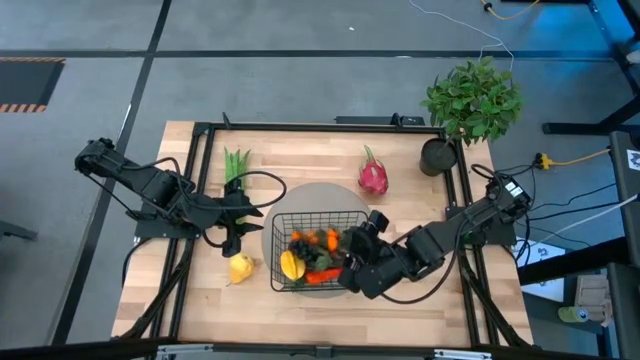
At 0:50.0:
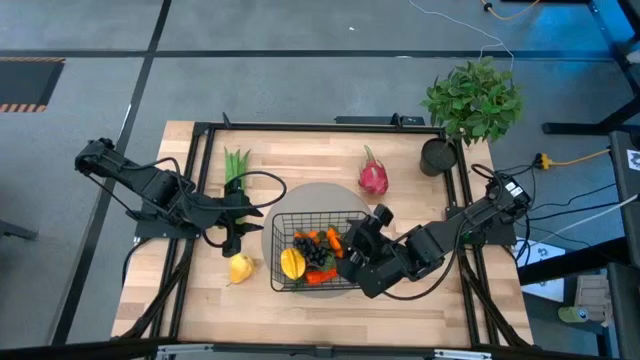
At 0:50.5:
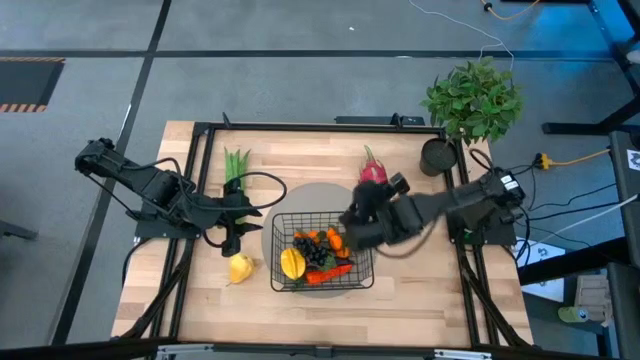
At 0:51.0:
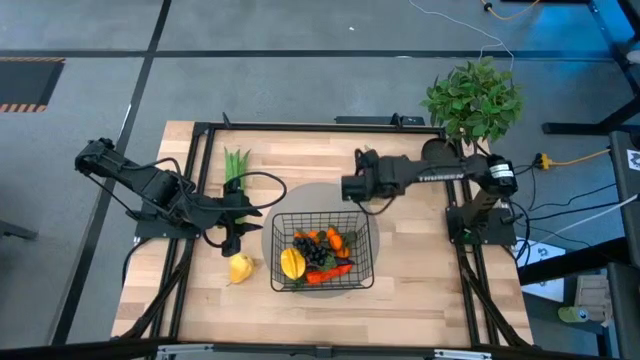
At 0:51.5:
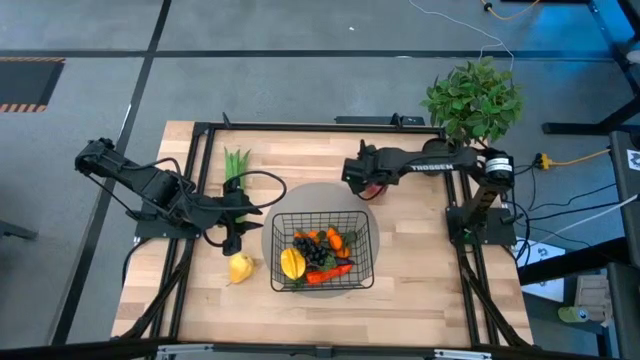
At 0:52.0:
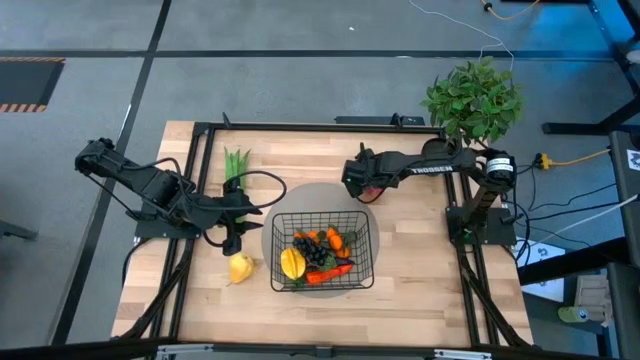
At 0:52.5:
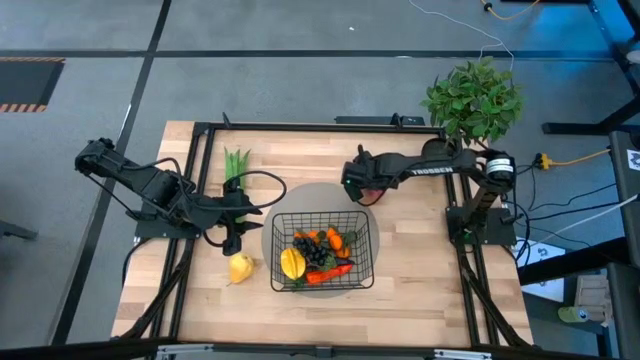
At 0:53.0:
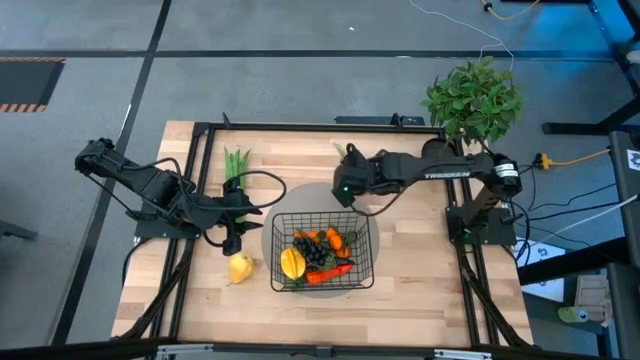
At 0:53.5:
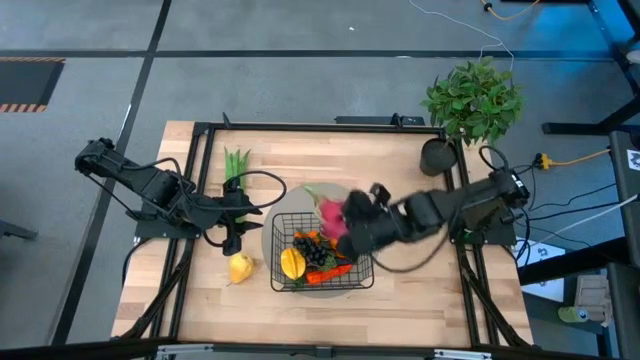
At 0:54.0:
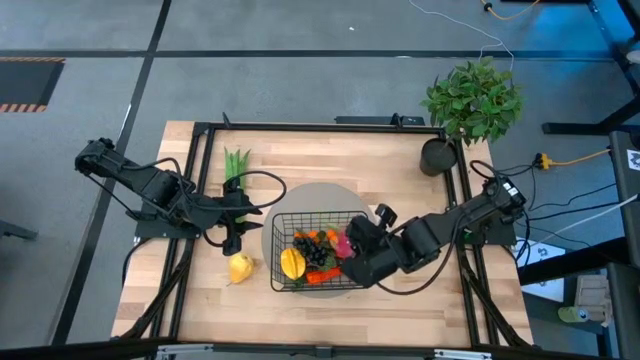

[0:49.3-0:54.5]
Task: Build produce basket
Put the dragonfruit into the wire basket

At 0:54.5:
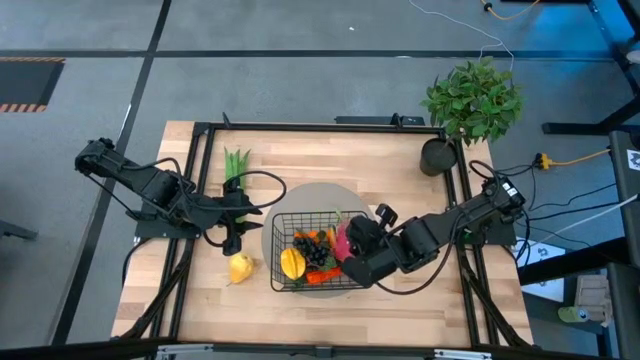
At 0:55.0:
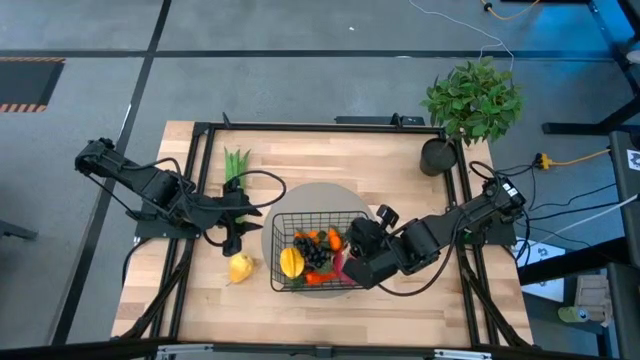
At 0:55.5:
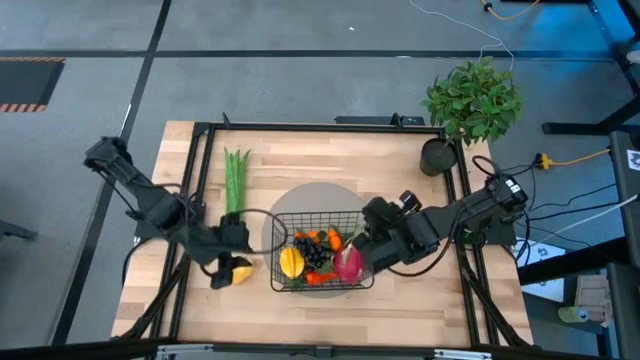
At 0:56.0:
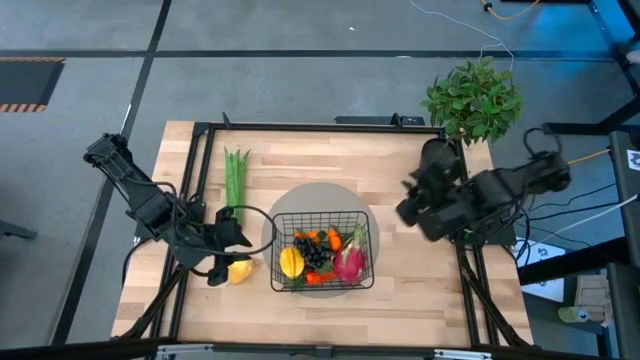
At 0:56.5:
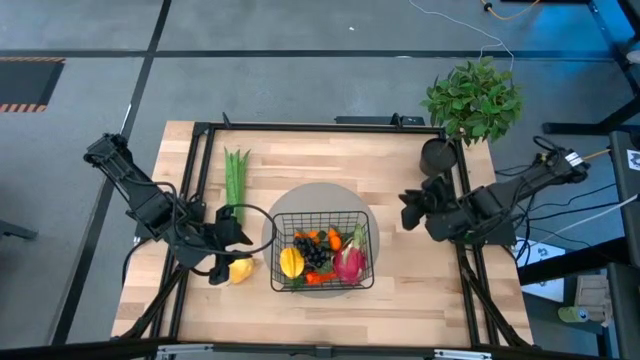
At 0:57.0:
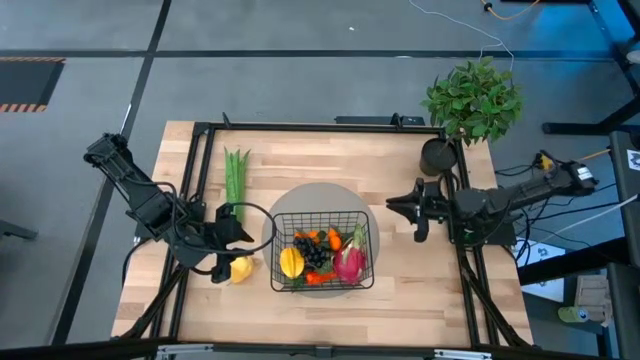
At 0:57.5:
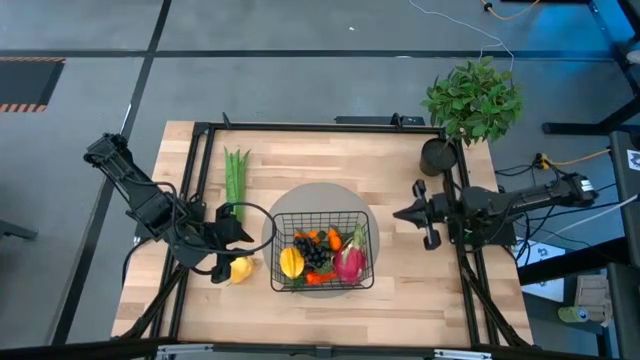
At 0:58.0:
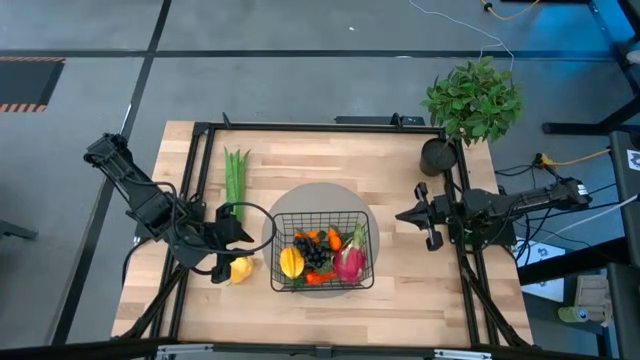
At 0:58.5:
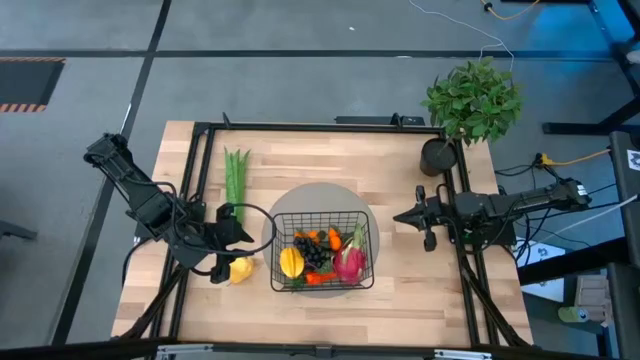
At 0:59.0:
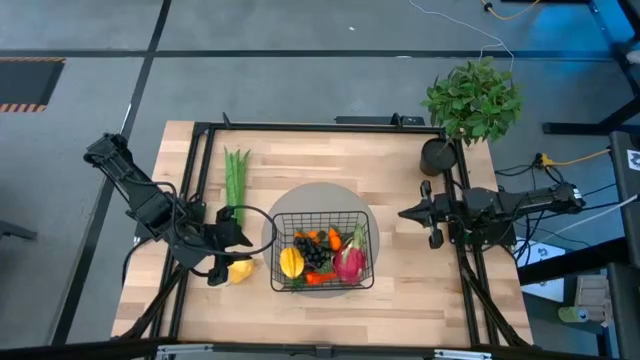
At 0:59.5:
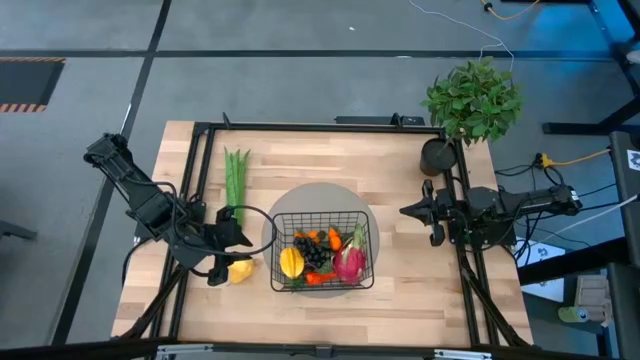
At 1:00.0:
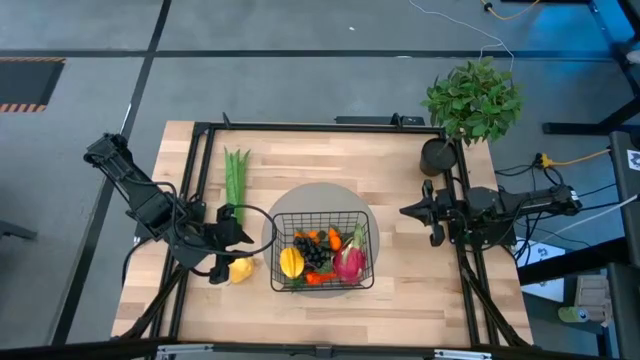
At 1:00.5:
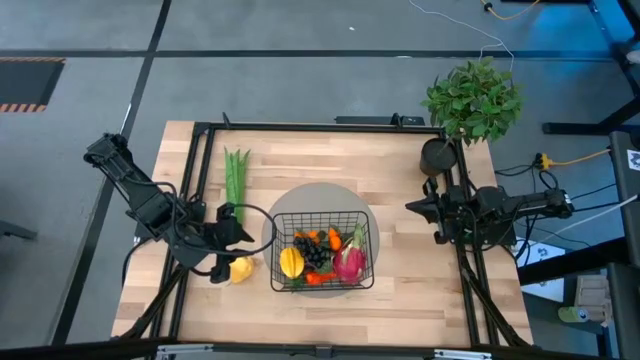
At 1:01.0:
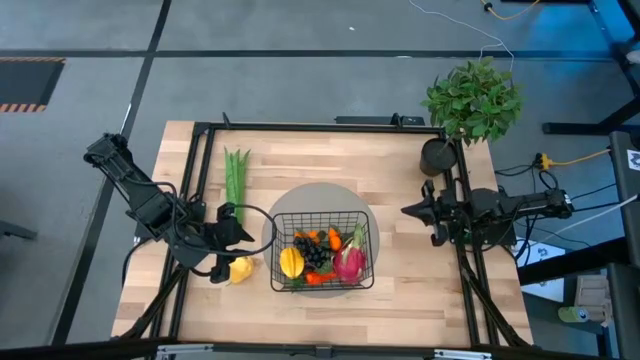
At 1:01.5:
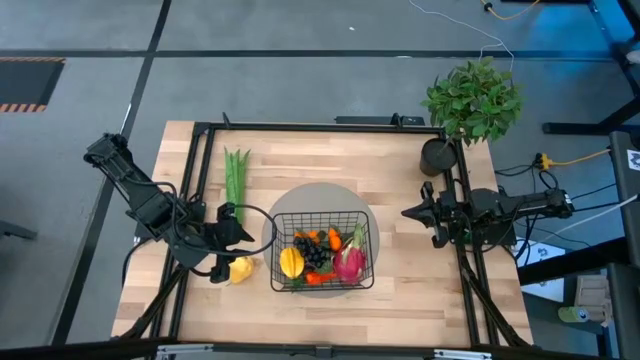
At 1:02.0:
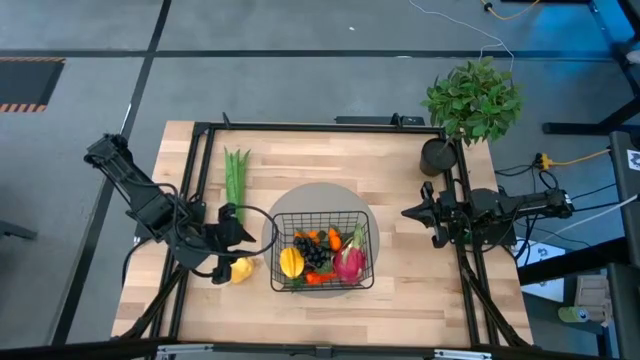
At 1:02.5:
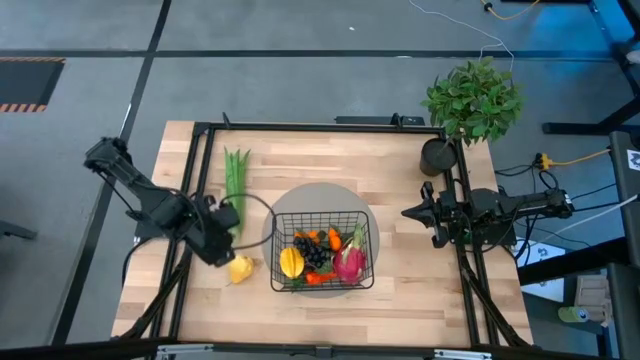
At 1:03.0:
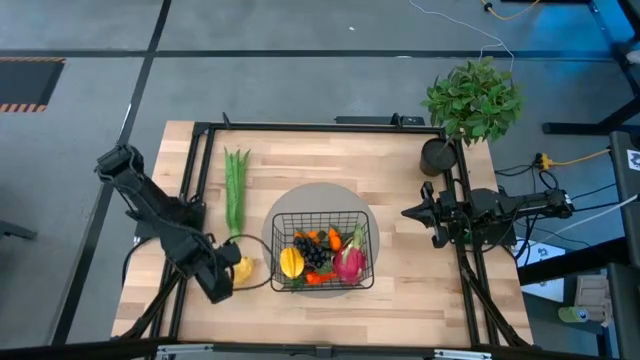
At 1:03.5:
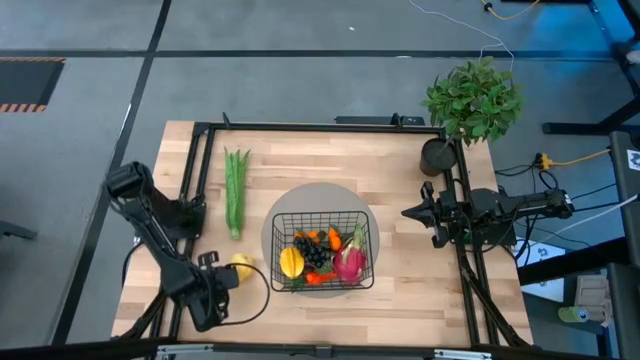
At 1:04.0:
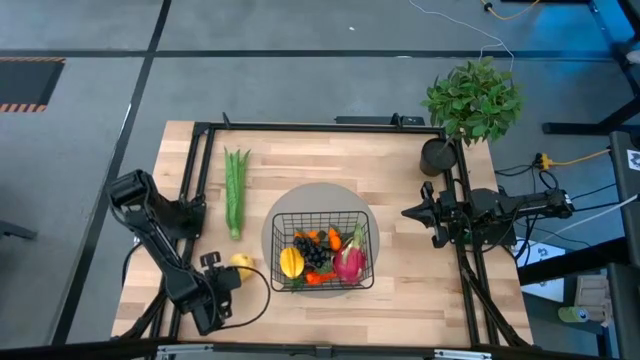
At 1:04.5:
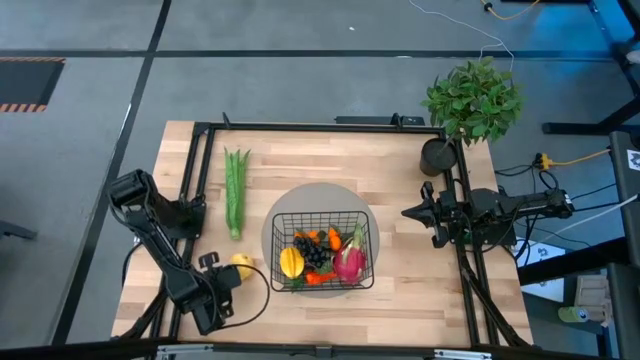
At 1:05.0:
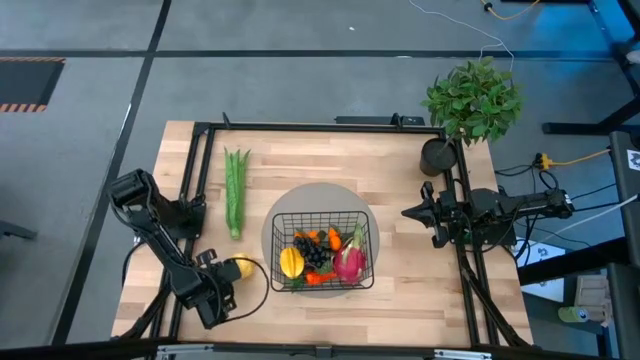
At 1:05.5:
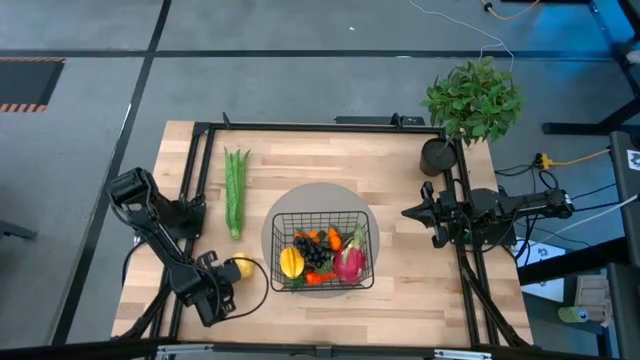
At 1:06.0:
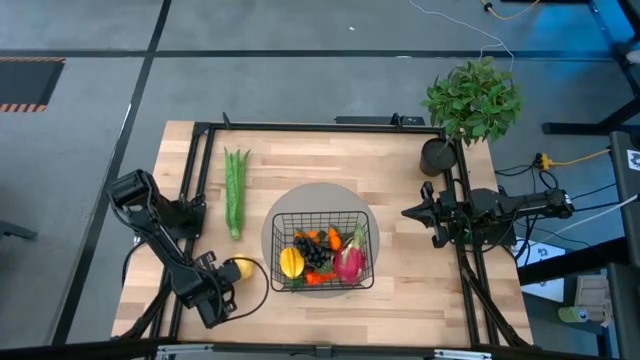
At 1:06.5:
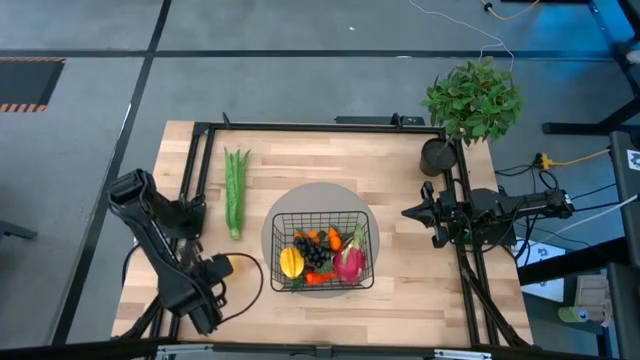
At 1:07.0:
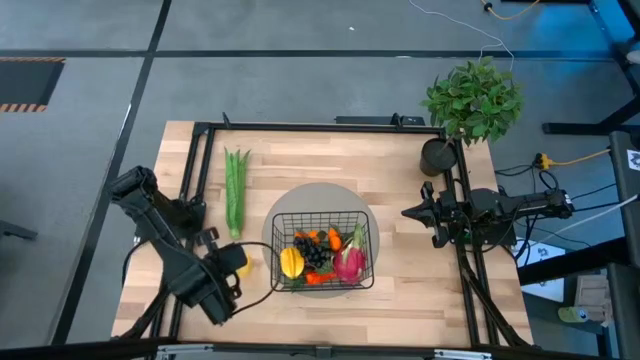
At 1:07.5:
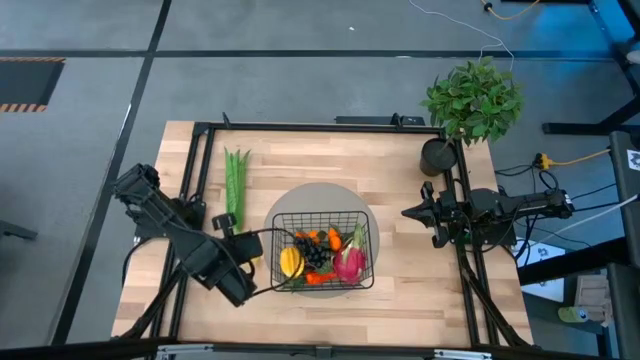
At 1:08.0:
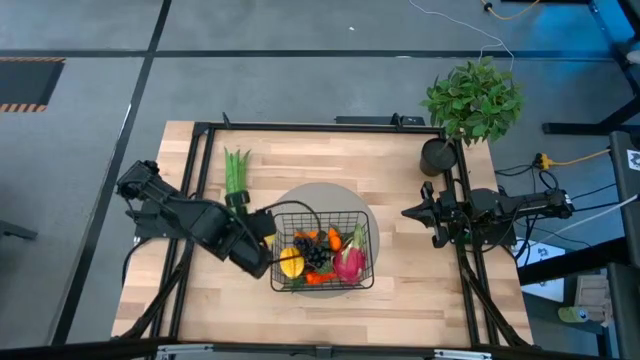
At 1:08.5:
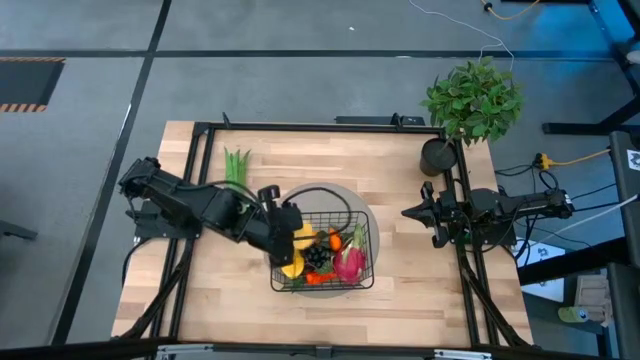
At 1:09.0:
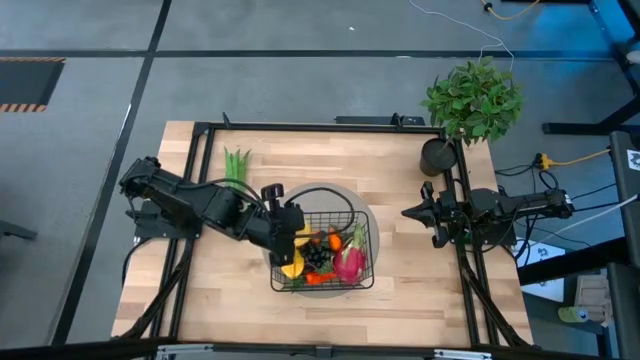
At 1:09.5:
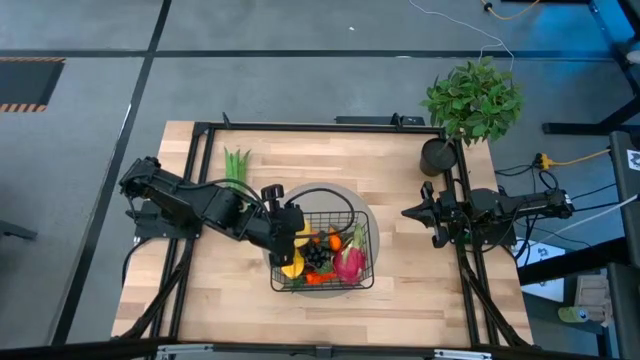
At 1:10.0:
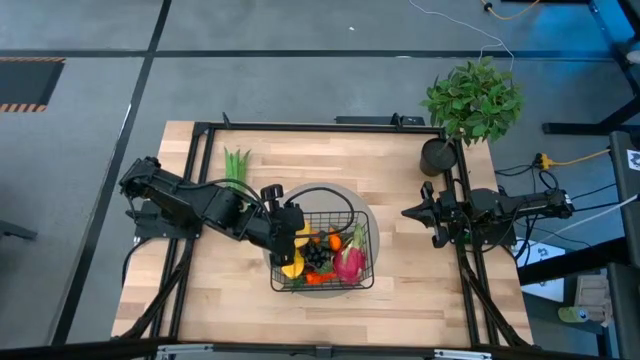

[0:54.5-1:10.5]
Put the pear into the wire basket
